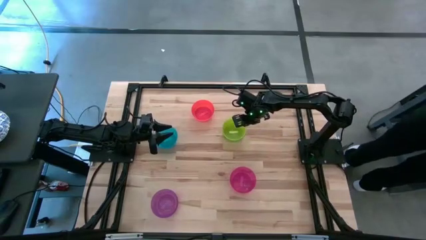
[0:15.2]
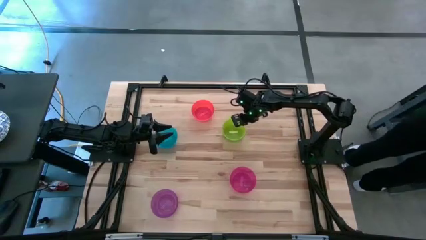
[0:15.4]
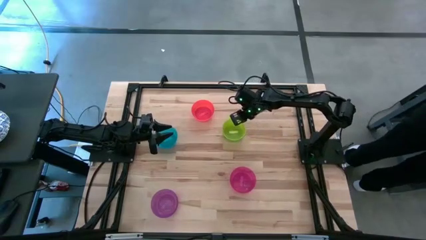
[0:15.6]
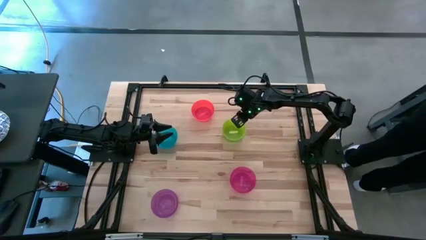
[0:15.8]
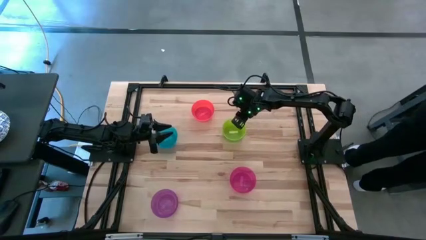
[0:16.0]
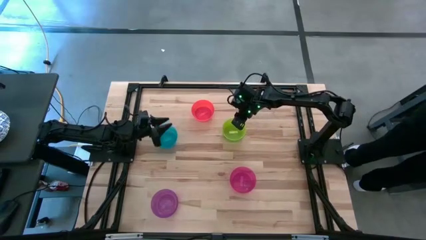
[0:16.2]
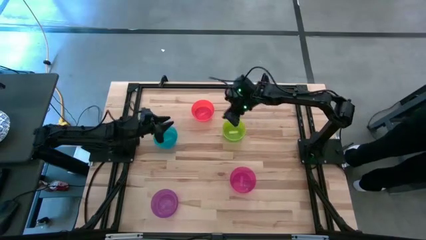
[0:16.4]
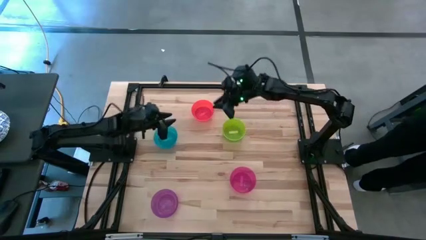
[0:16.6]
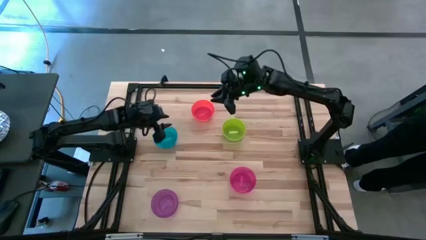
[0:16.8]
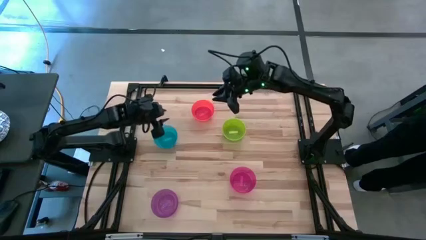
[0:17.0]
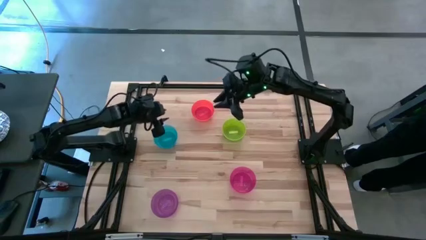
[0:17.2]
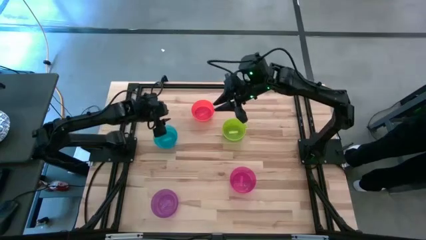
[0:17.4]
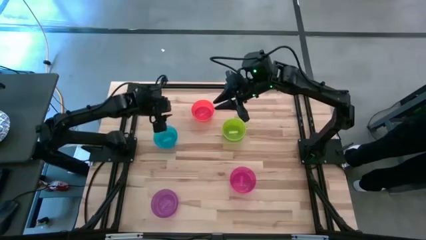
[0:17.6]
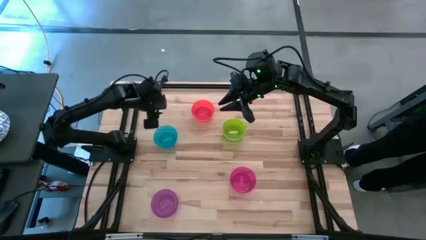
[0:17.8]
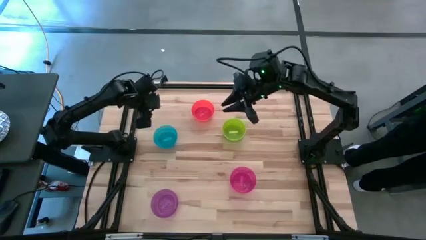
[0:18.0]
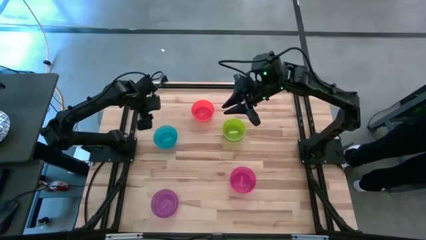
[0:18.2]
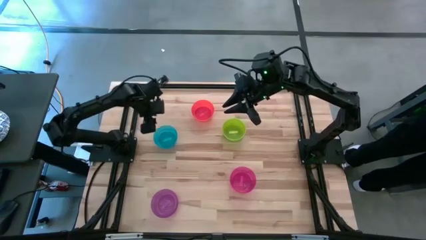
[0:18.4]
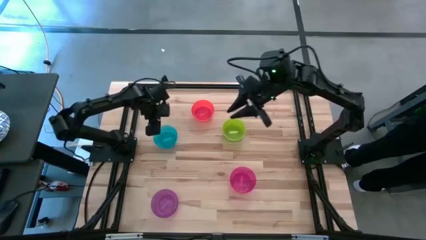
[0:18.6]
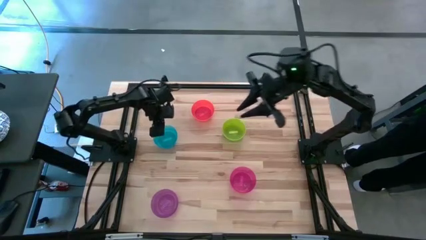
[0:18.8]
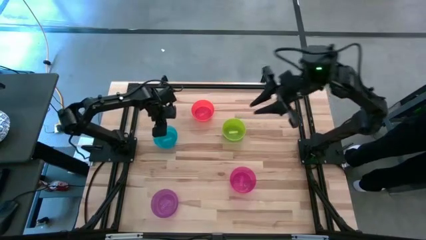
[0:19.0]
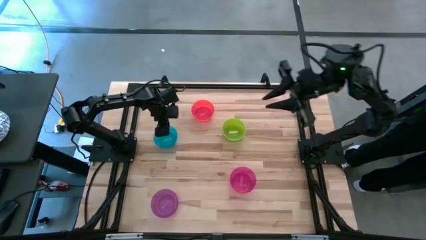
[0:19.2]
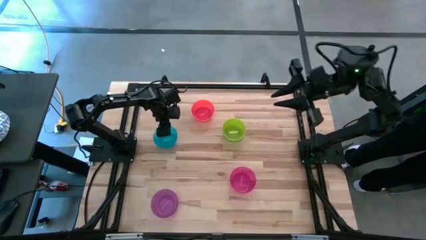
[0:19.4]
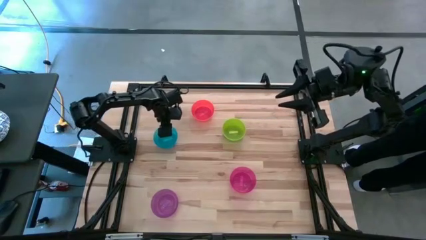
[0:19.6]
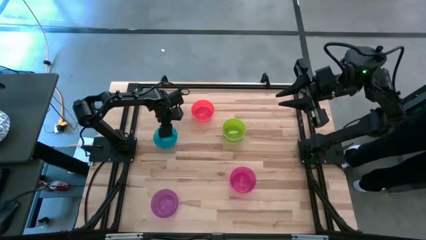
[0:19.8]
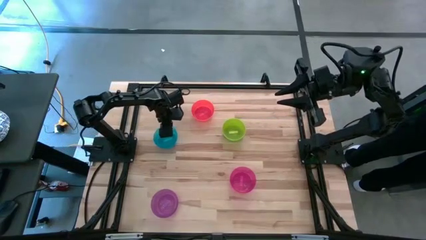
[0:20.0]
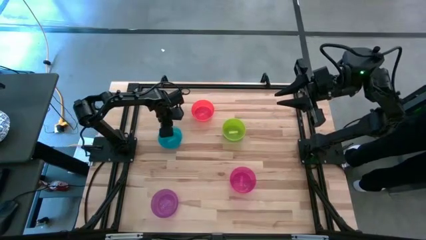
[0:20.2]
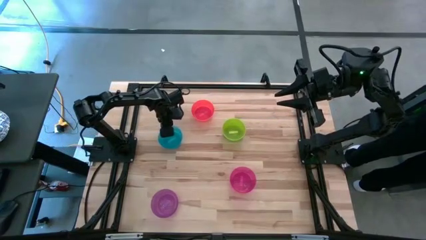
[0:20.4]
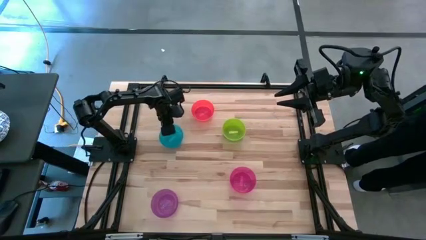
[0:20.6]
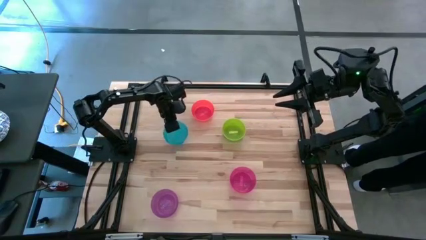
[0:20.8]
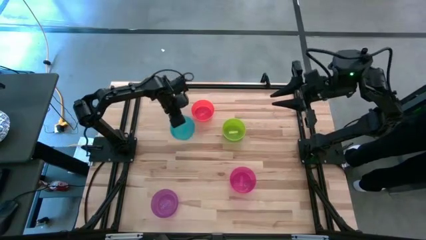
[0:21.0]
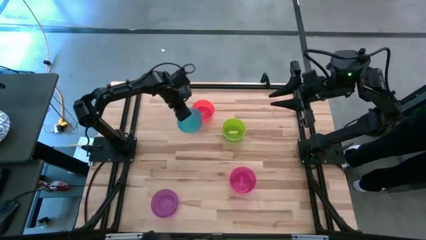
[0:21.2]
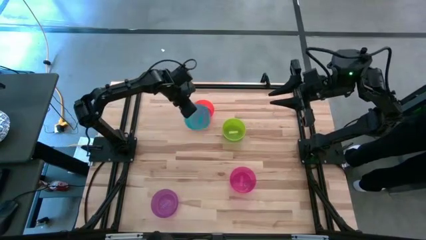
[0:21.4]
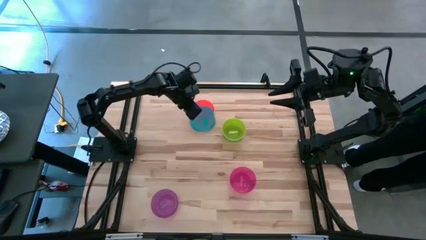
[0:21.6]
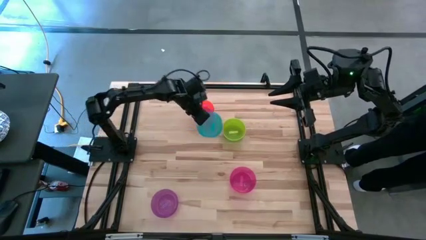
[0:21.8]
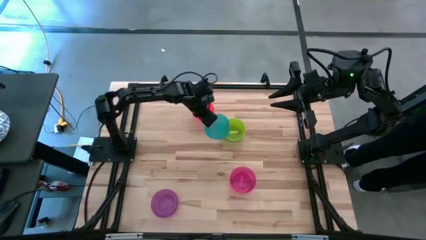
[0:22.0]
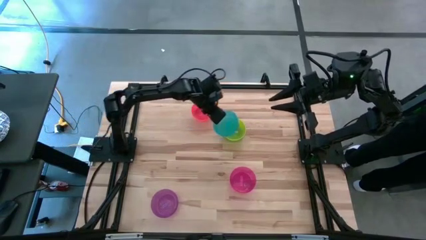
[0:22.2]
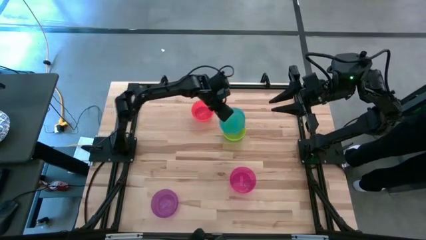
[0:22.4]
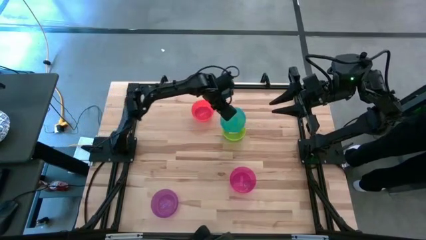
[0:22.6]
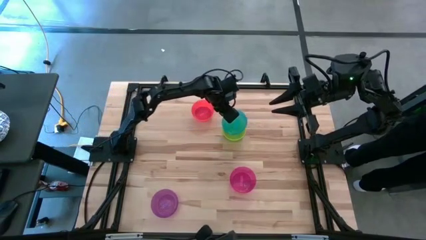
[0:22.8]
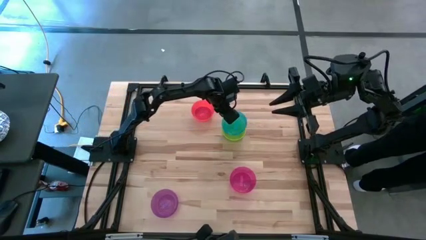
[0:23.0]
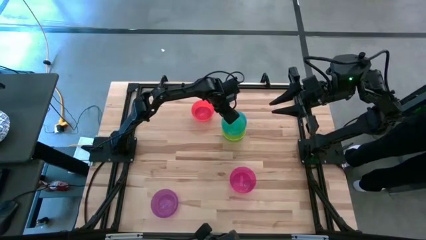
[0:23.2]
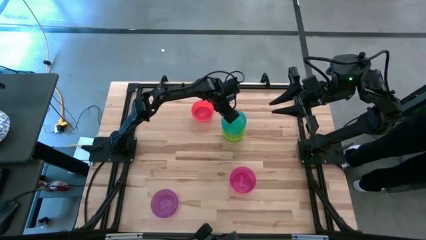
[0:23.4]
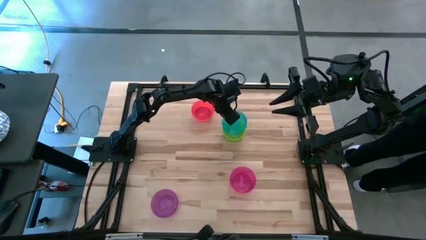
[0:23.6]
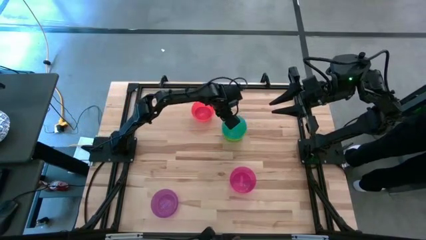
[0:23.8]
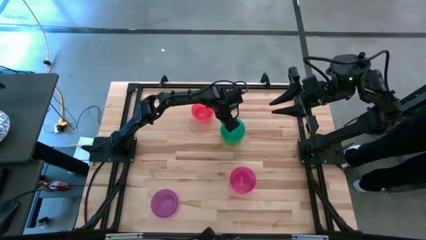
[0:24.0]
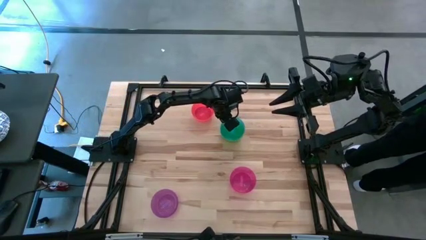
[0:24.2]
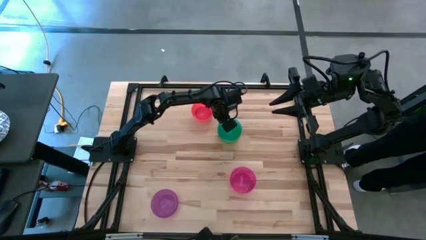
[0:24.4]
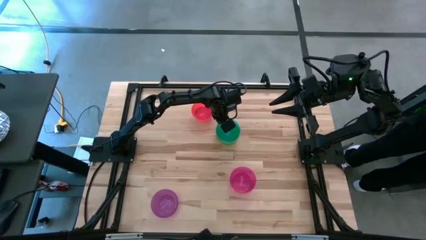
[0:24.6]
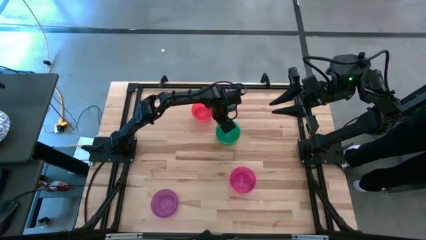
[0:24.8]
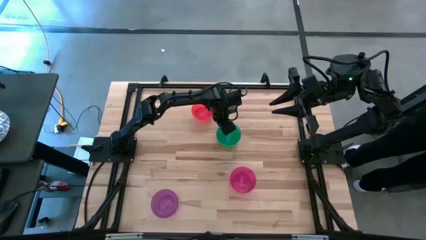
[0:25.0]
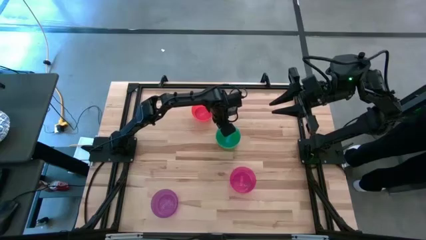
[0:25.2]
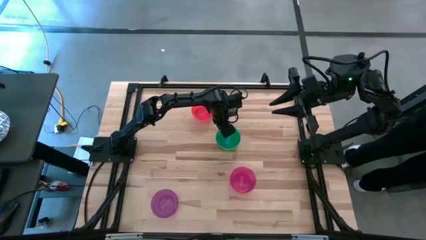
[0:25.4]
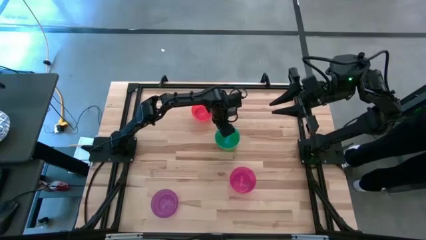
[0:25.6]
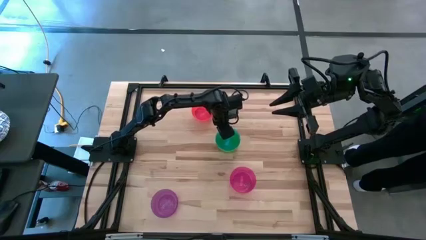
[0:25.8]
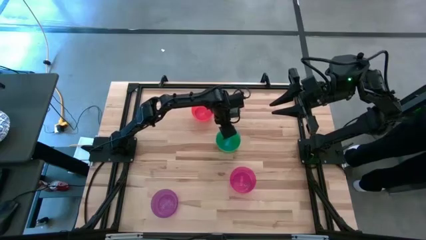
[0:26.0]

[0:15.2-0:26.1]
Task: Nest bowls inside each other
Stack the blue bowl on top of the yellow bowl

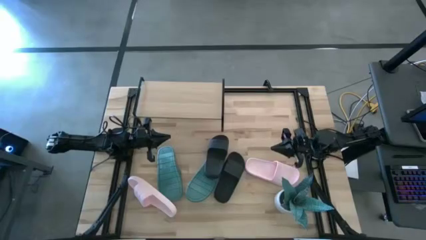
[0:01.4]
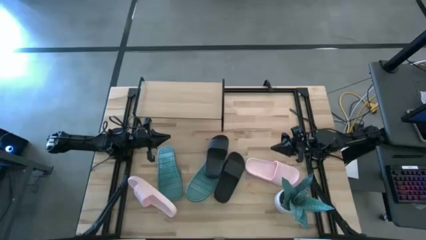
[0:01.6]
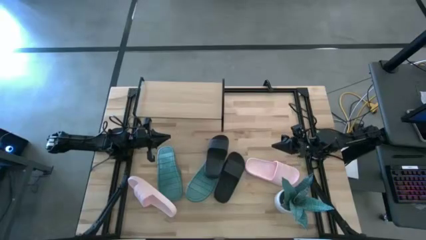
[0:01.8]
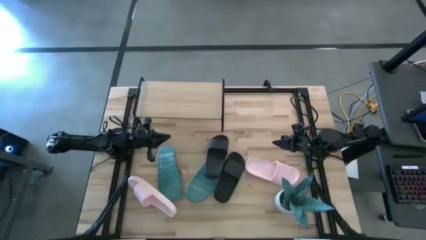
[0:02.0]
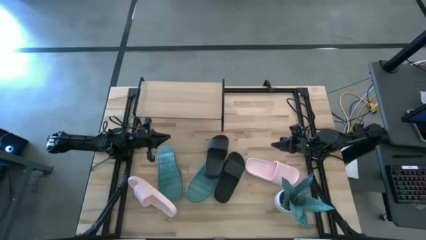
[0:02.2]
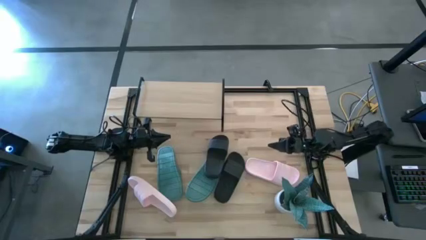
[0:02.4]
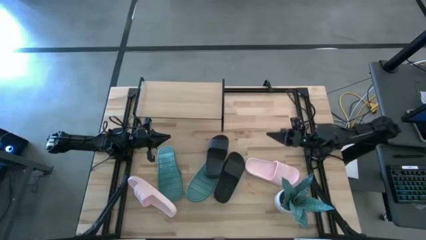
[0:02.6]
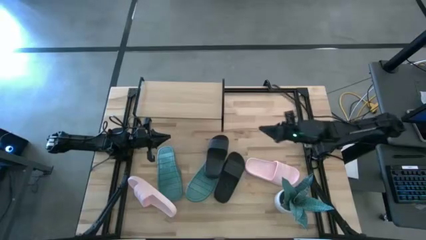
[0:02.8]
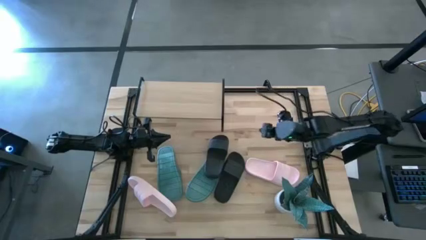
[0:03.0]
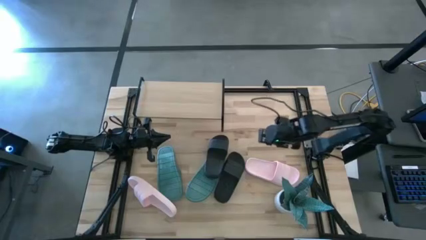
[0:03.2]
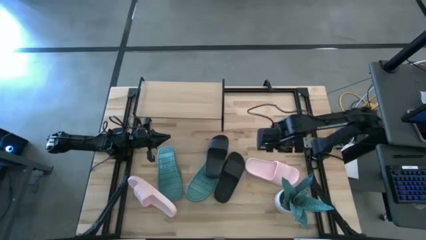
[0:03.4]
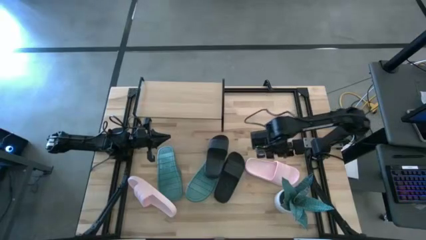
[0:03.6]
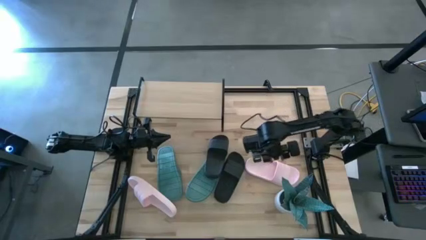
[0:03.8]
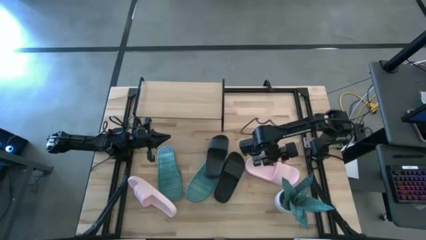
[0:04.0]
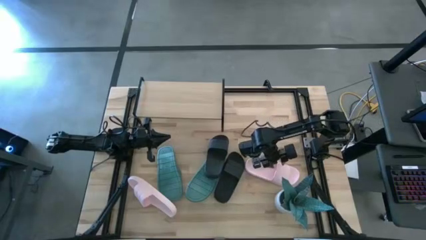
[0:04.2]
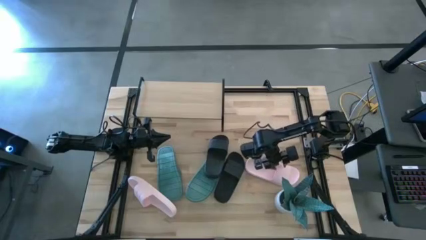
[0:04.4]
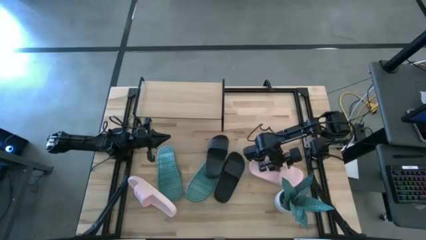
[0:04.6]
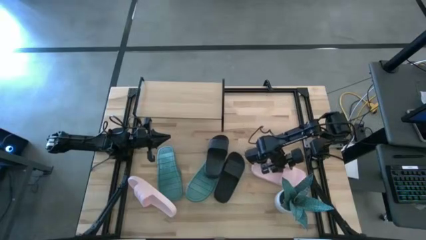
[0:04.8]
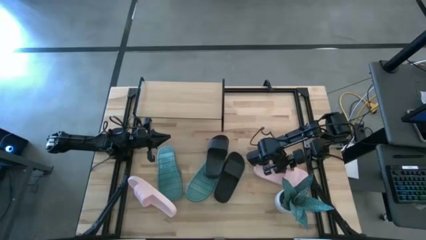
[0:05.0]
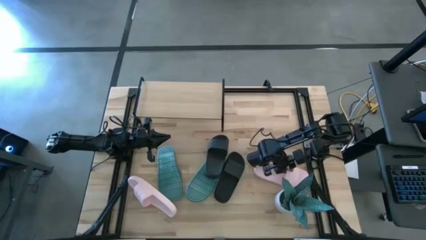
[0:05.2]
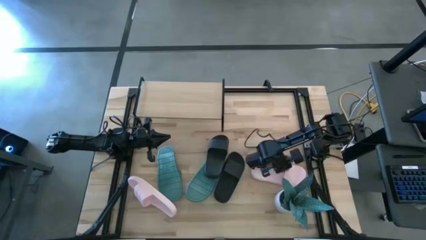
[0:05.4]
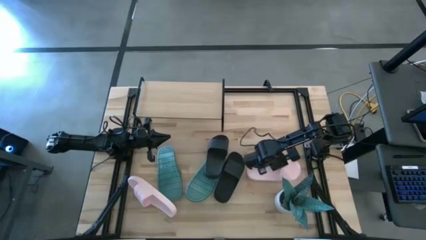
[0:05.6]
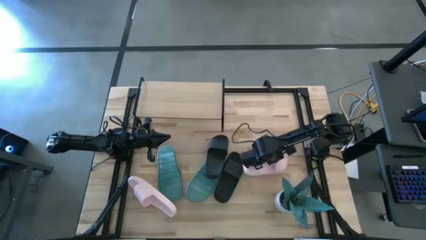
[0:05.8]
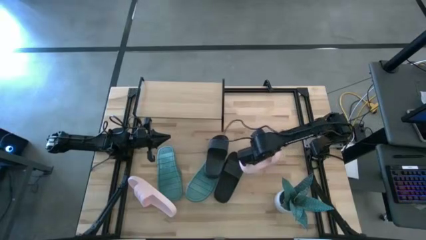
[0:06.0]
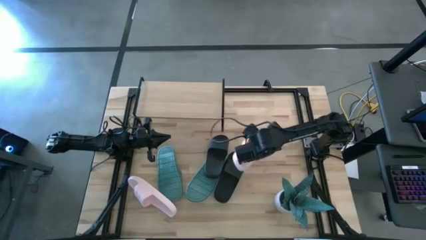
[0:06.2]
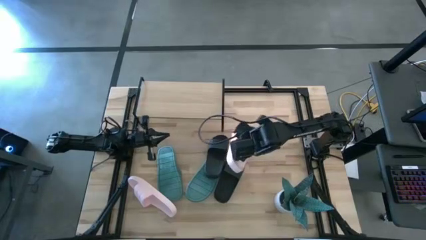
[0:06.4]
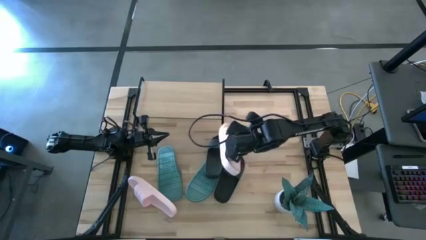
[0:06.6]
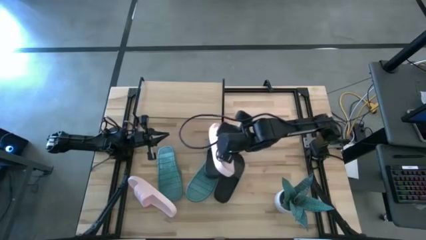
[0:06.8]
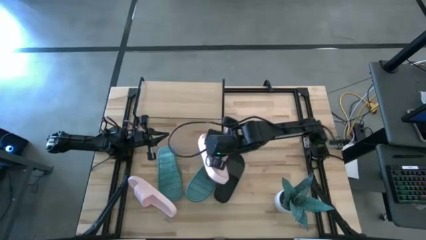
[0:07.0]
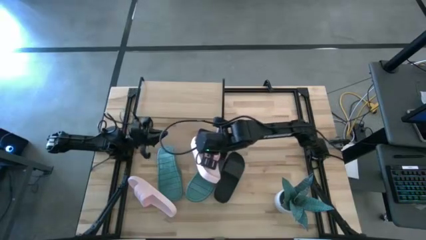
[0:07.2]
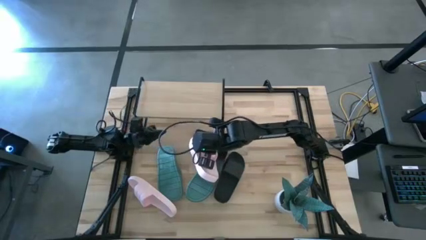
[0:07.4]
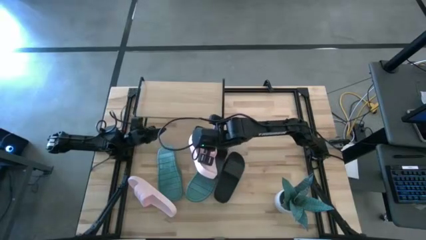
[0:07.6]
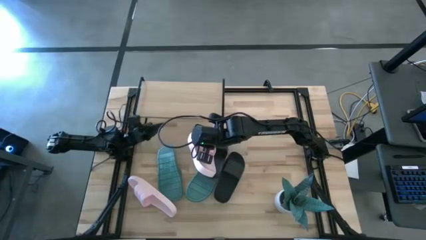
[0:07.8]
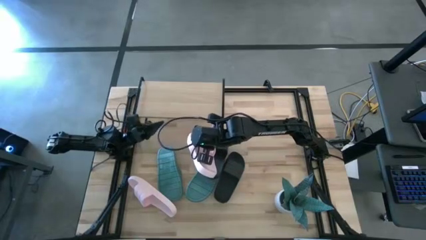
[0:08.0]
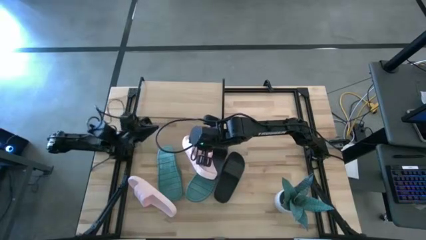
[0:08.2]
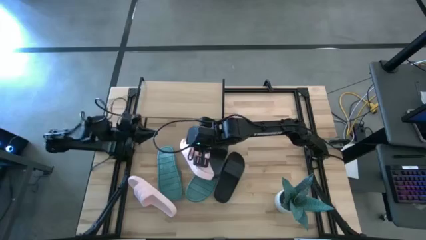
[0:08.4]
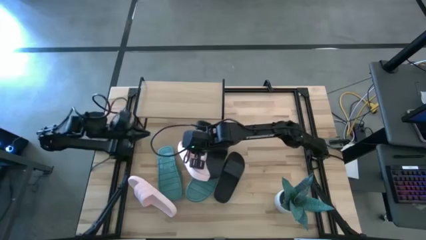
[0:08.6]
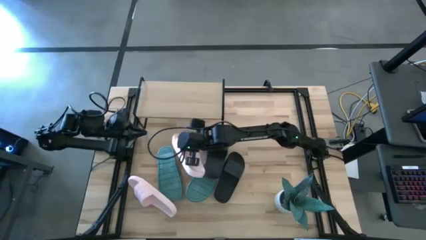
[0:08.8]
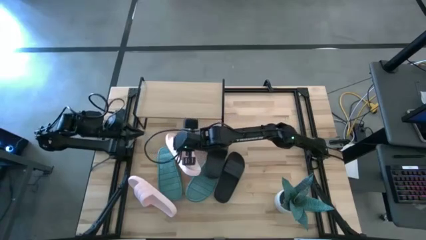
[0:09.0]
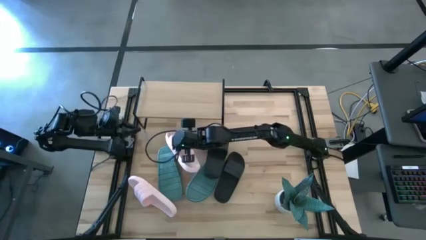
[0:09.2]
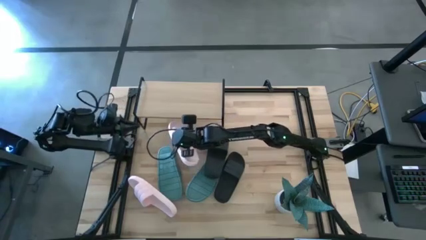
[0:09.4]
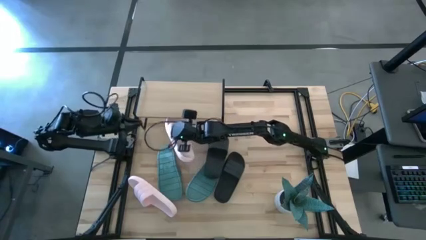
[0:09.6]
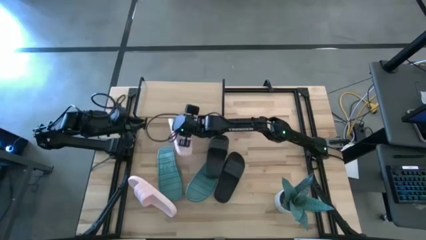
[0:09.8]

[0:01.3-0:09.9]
Task: Pick and place slides into the shelf
Put the right pink slide under the shelf
